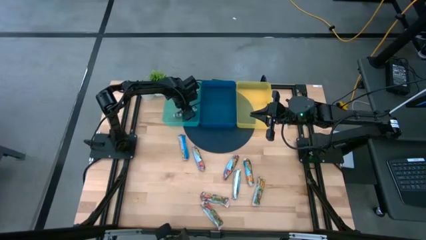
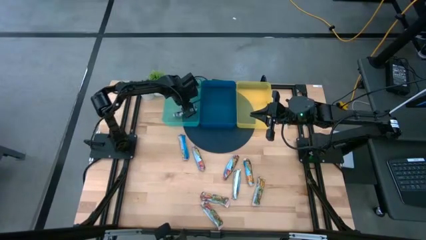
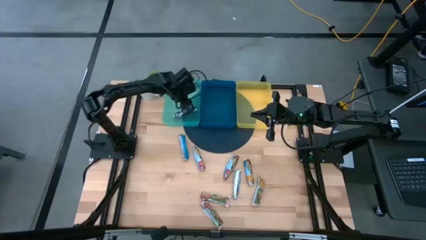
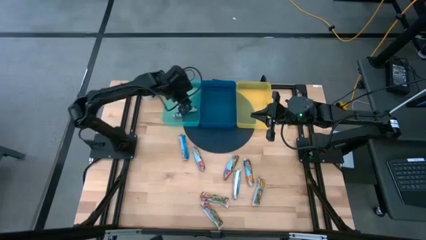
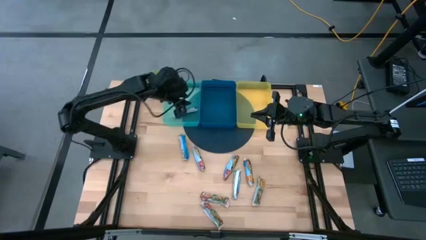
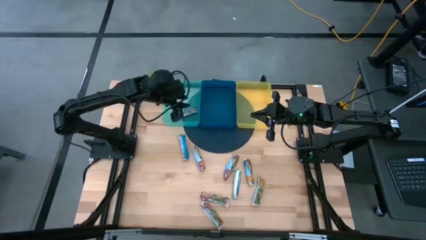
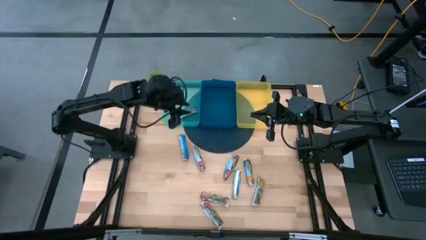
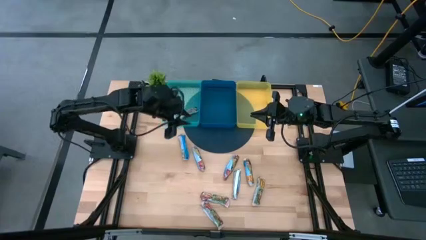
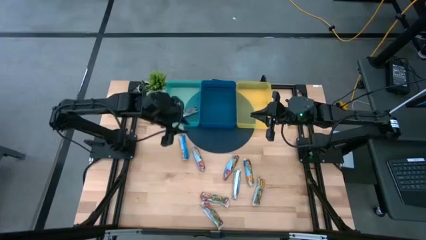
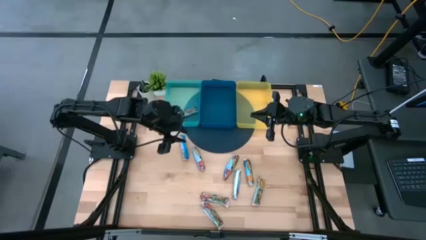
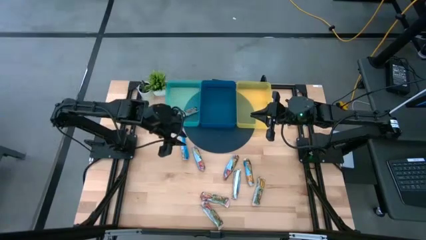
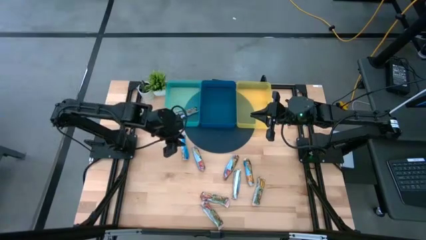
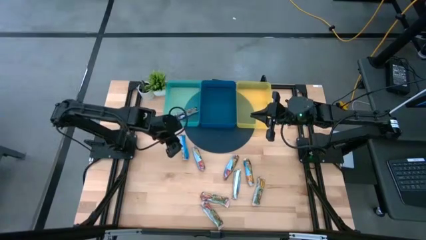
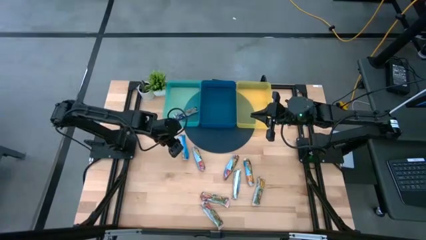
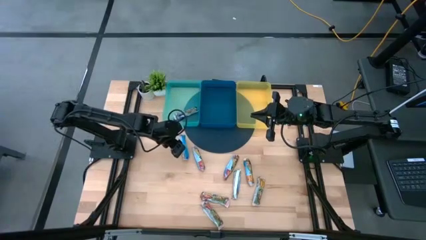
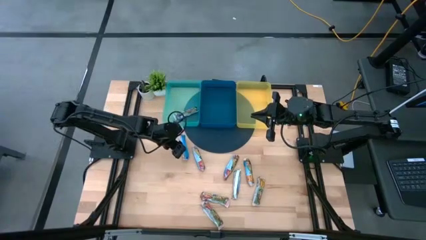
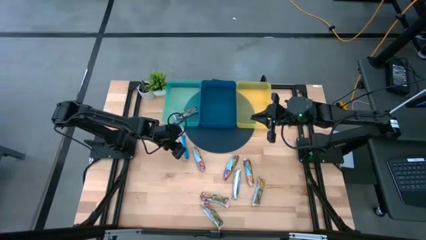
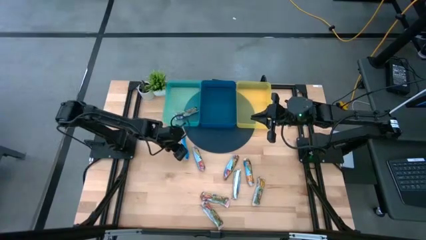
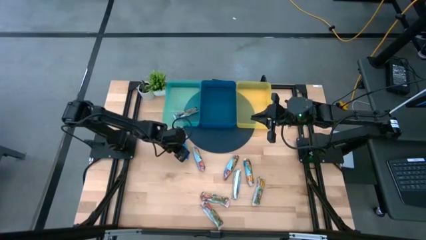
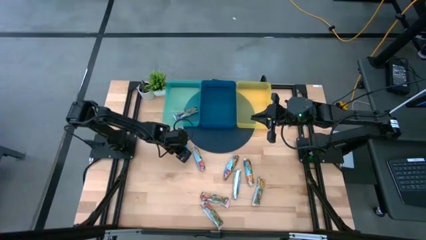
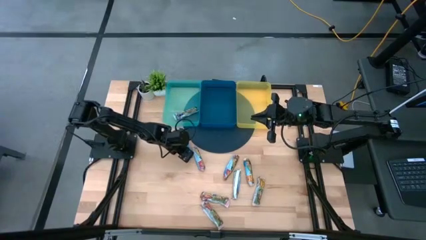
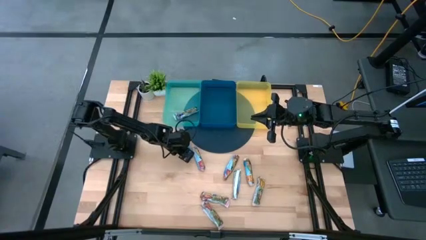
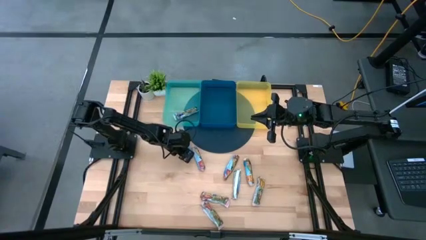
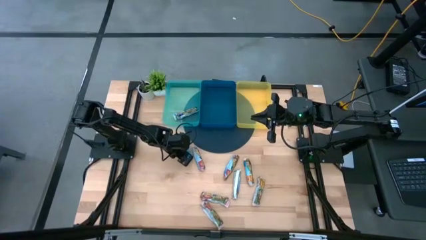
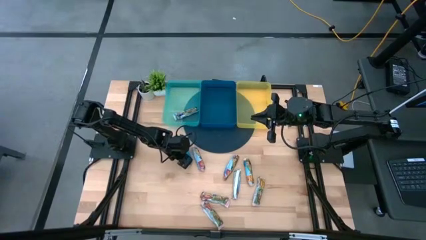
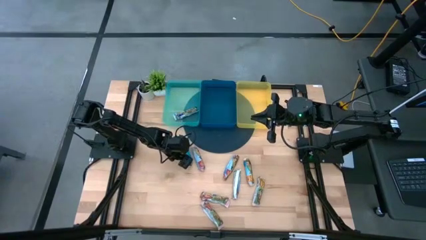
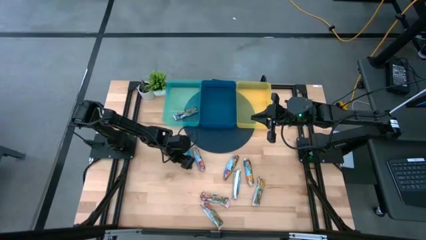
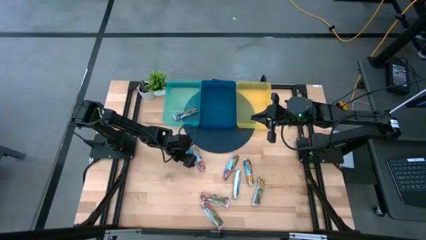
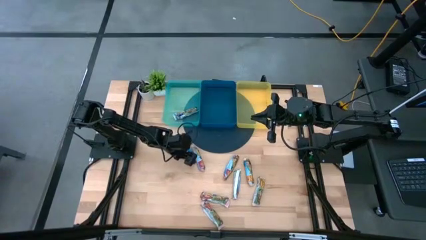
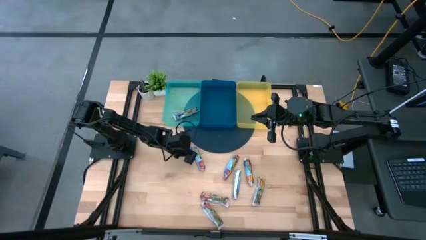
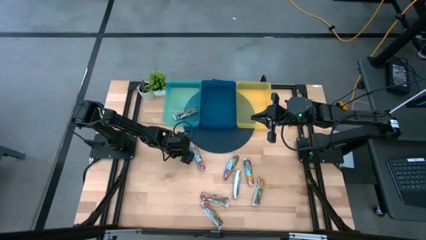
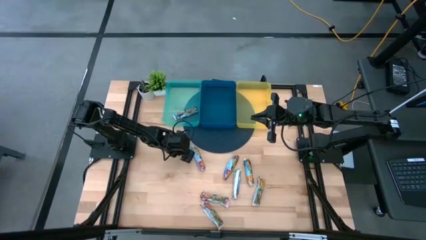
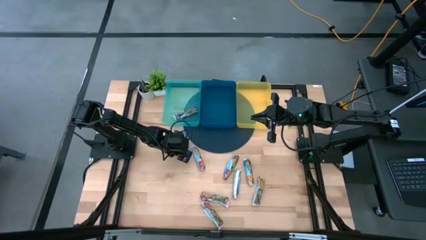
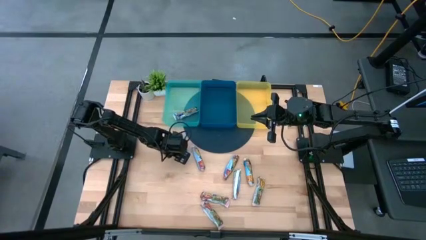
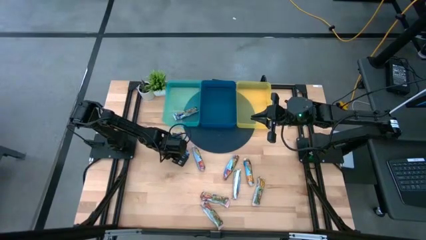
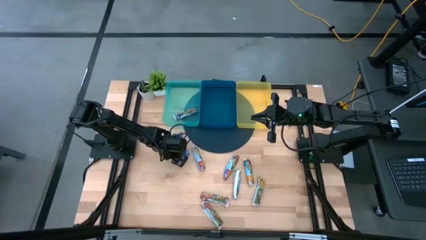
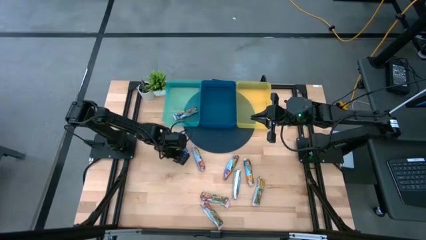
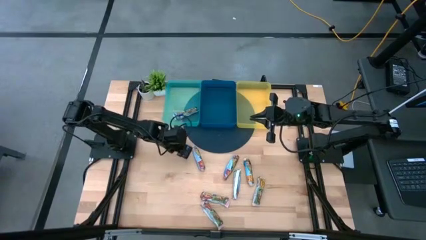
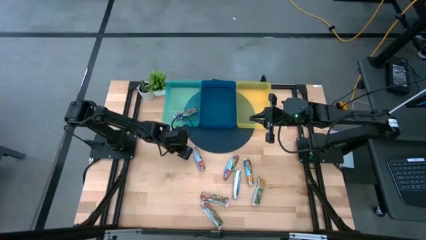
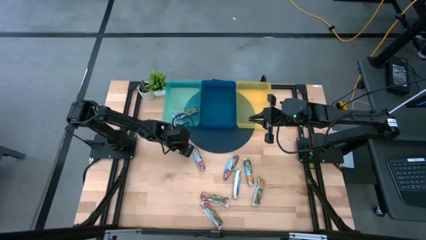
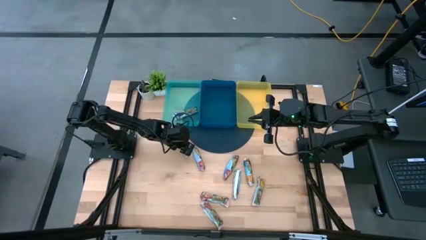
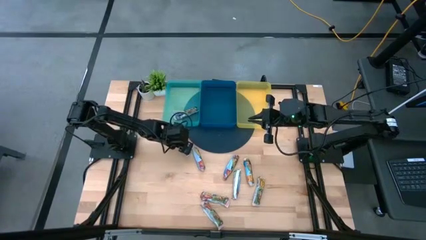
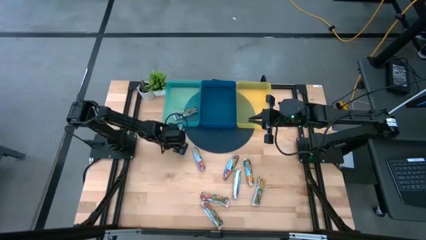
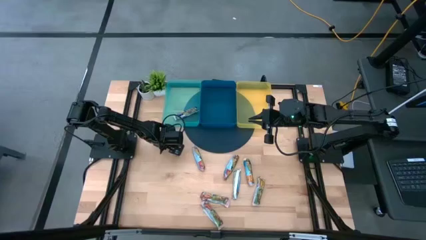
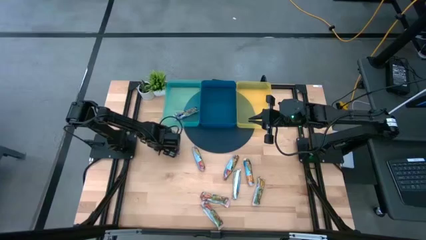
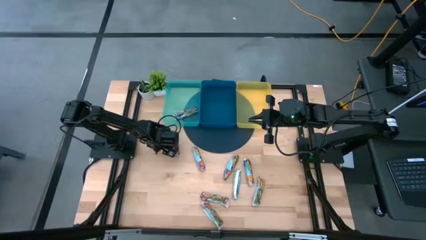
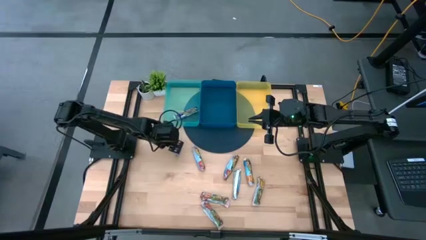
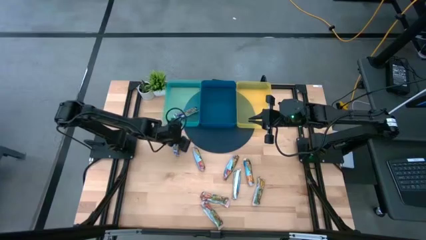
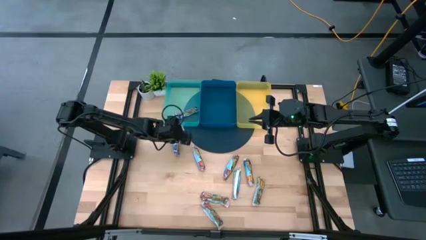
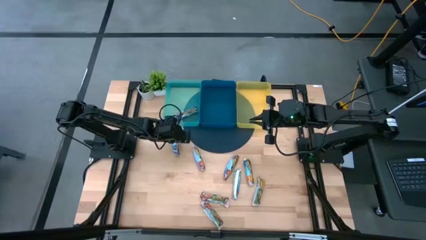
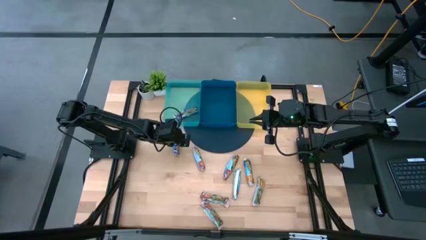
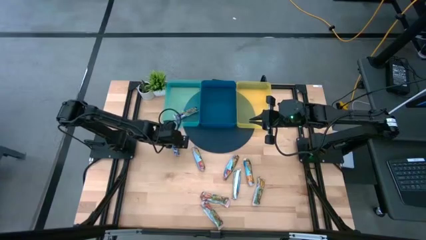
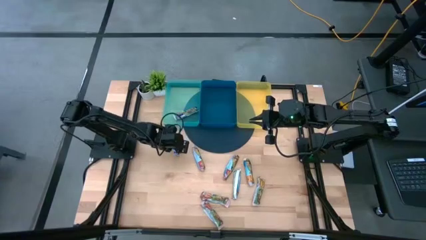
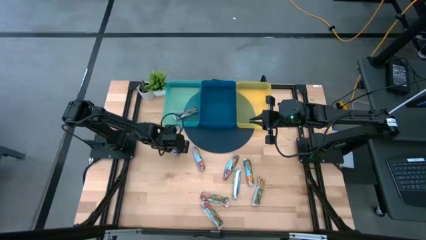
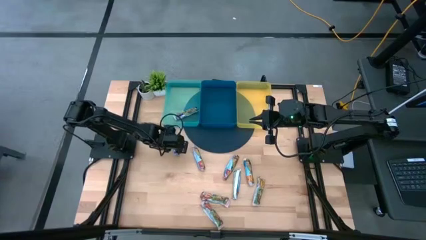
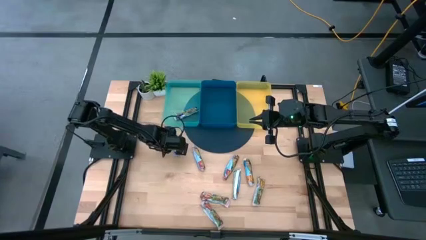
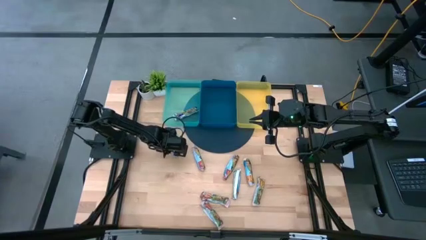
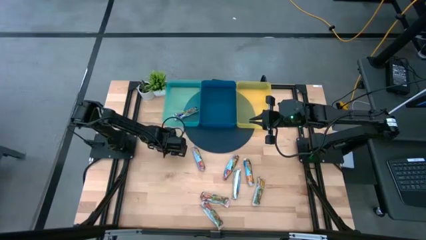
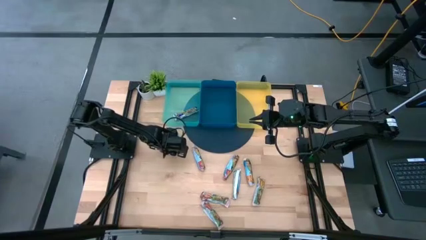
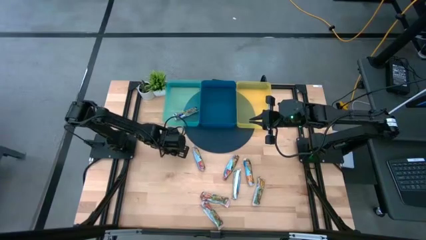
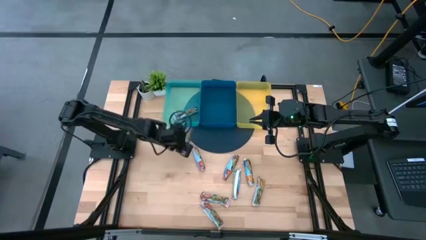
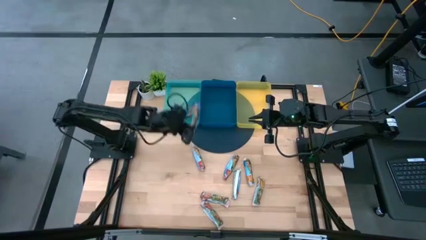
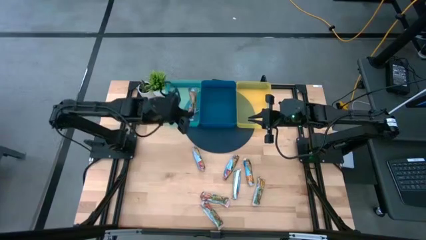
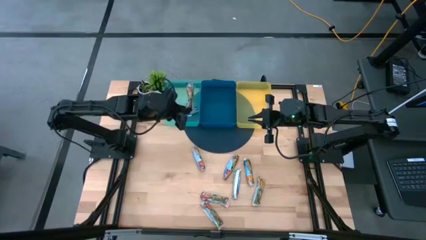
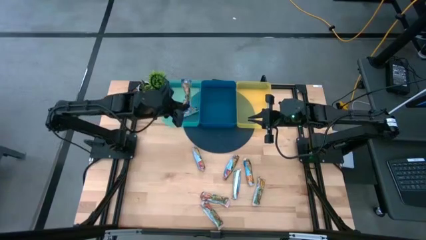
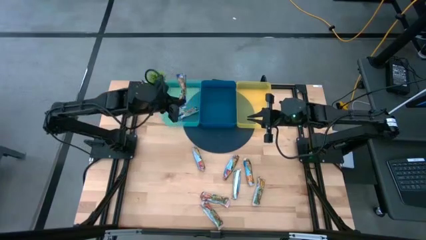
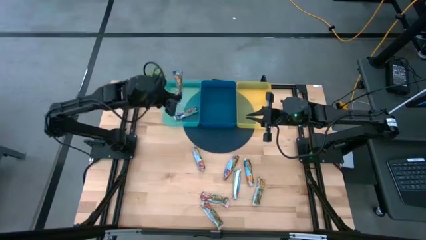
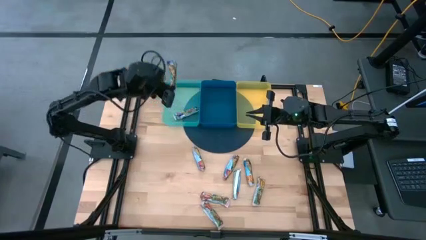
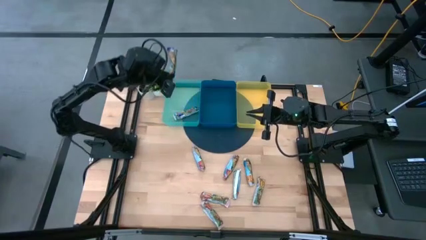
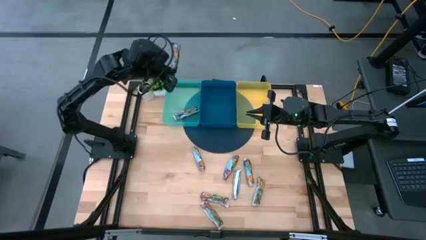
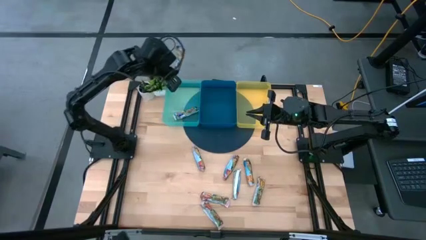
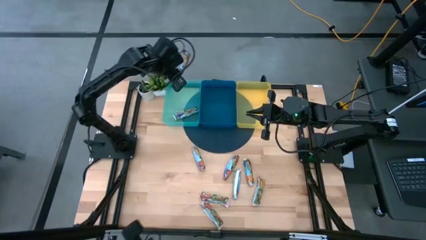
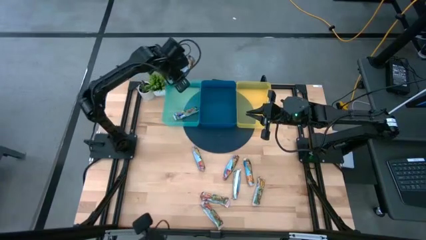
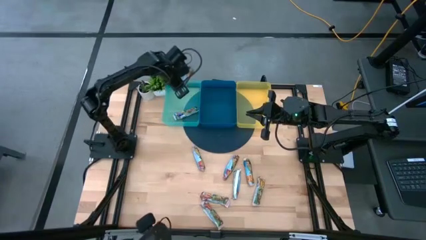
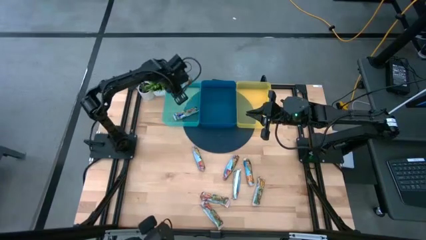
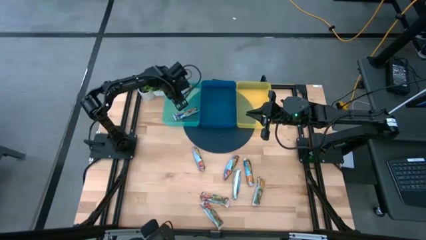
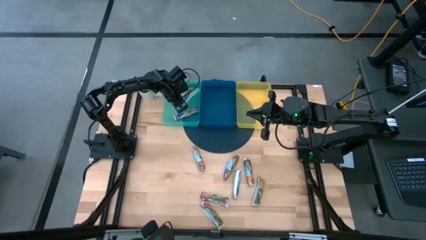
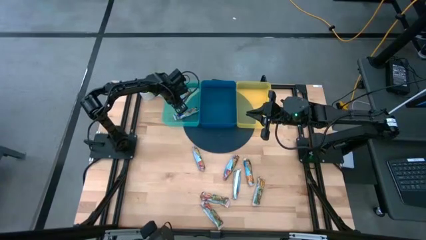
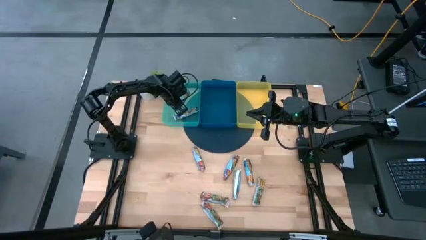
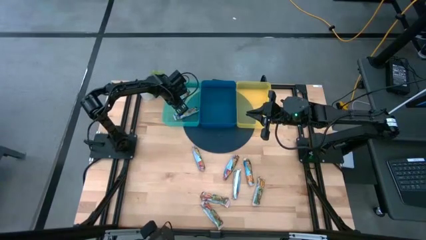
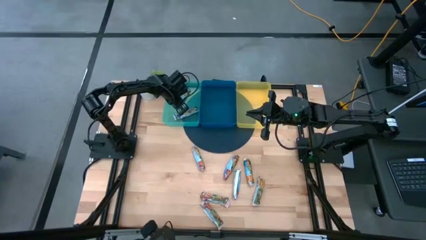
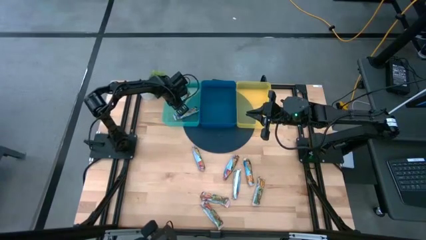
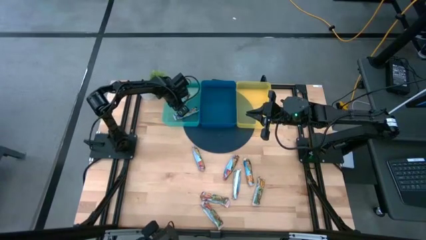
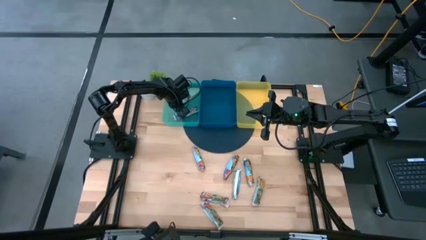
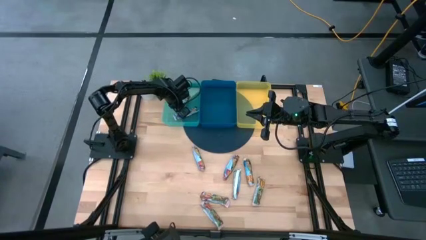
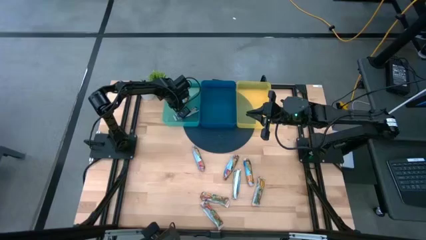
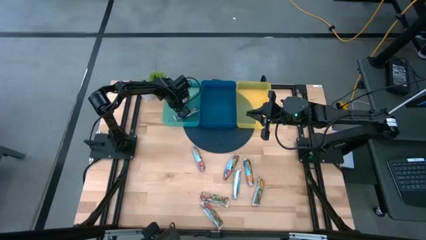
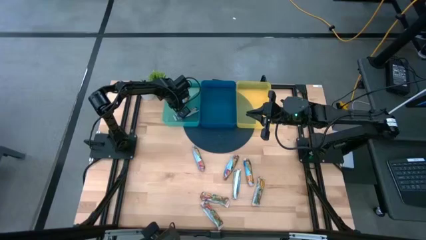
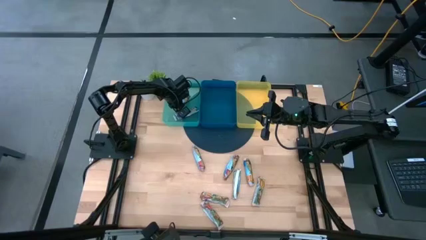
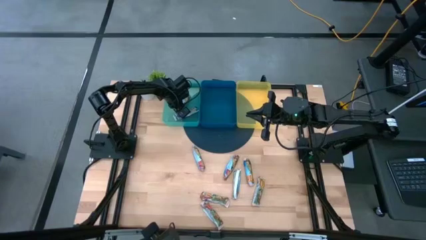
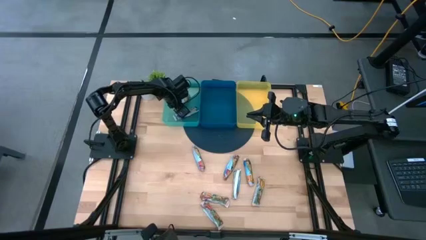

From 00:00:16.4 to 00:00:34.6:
Task: Pick and place Granola Bars by type
Put the blue granola bar into the light blue bin
